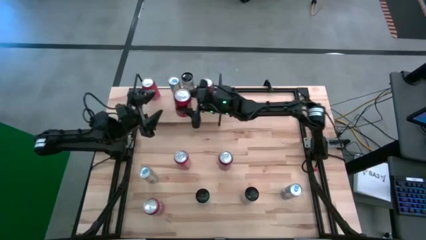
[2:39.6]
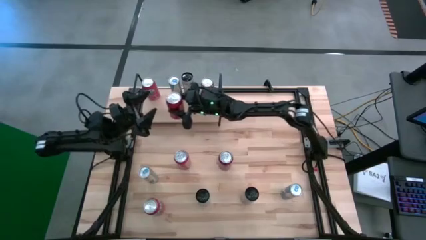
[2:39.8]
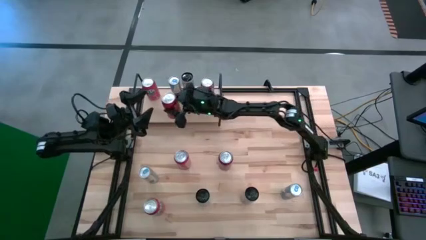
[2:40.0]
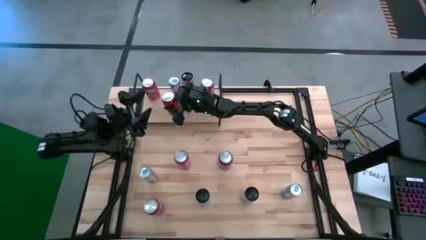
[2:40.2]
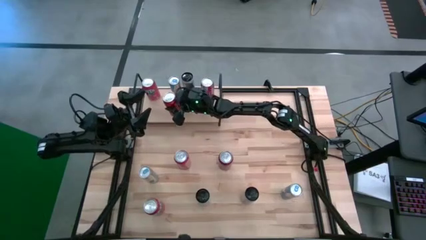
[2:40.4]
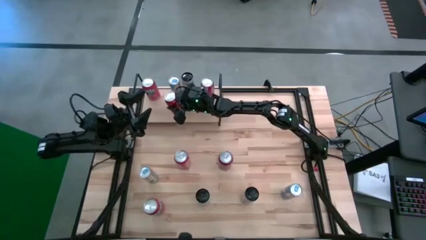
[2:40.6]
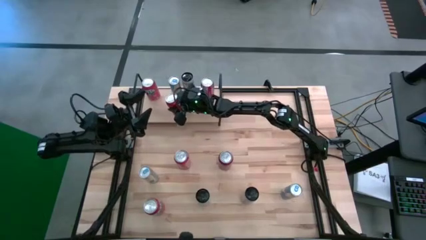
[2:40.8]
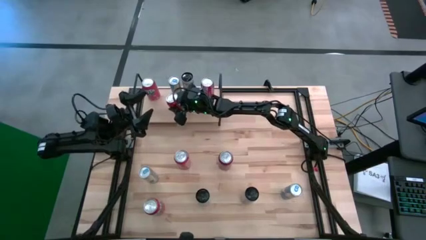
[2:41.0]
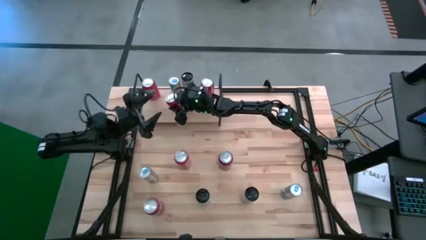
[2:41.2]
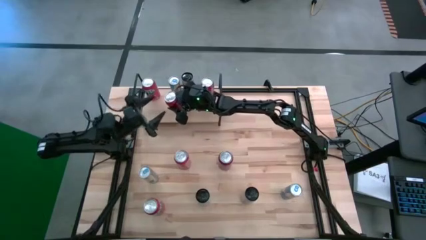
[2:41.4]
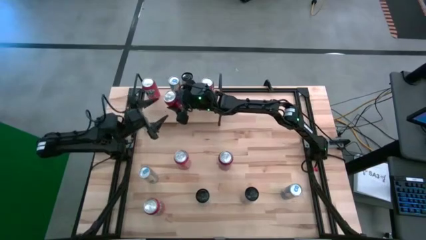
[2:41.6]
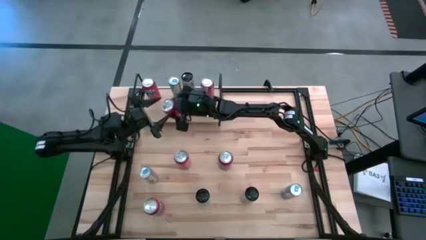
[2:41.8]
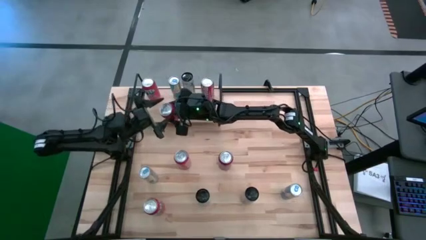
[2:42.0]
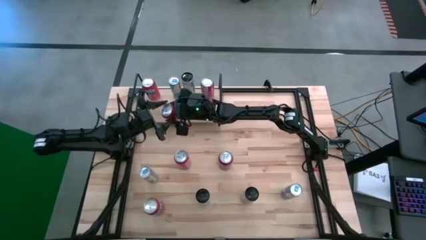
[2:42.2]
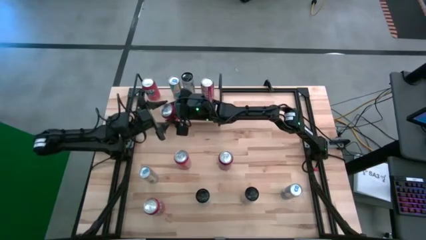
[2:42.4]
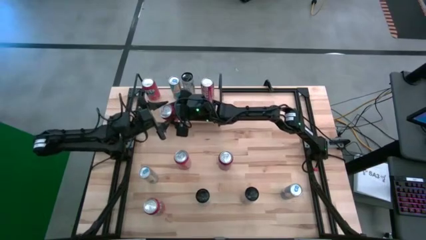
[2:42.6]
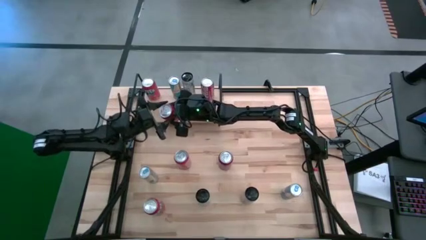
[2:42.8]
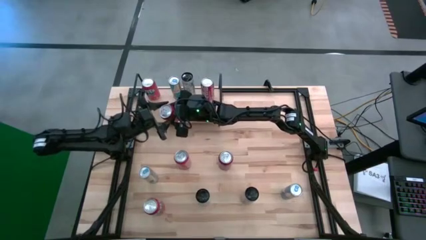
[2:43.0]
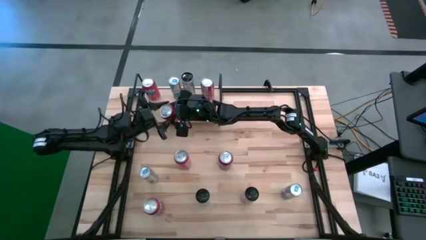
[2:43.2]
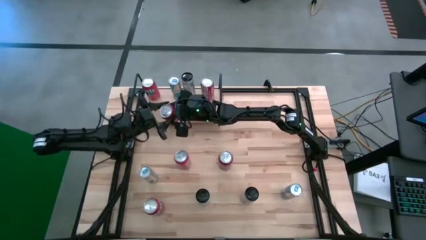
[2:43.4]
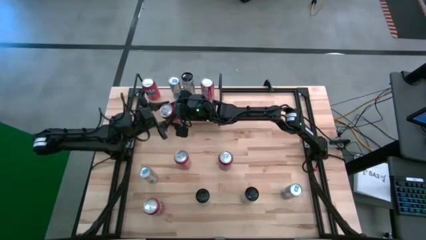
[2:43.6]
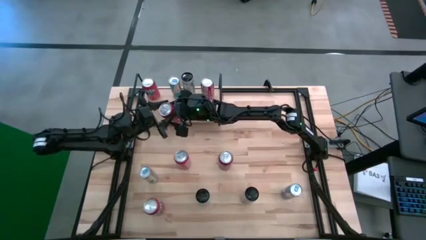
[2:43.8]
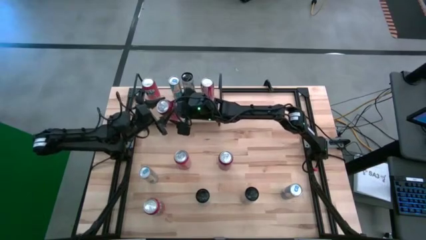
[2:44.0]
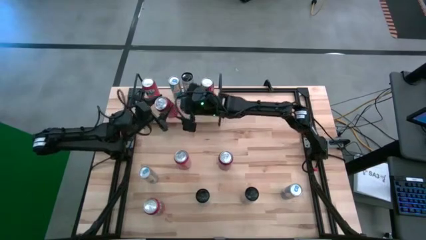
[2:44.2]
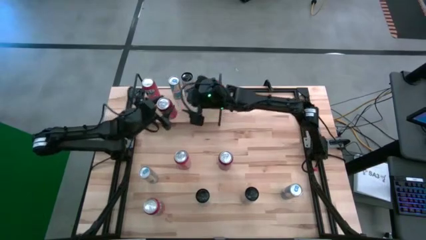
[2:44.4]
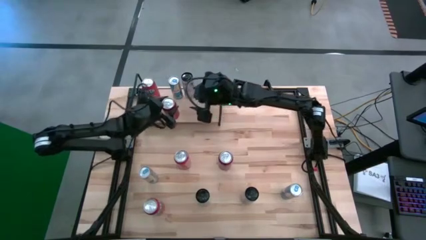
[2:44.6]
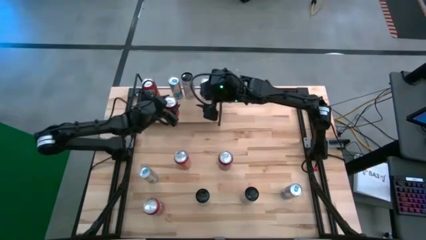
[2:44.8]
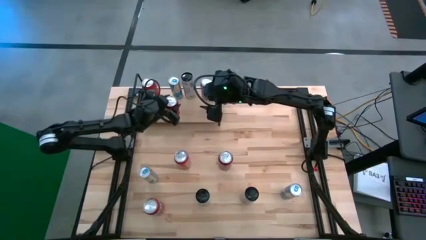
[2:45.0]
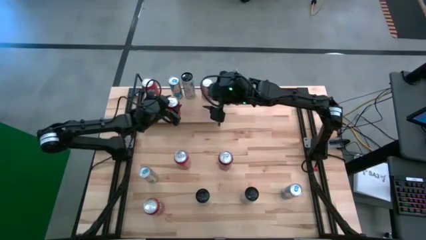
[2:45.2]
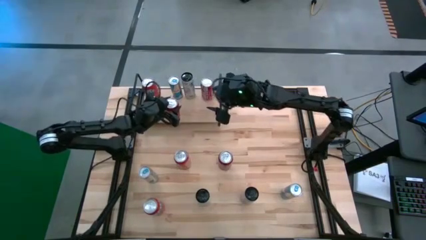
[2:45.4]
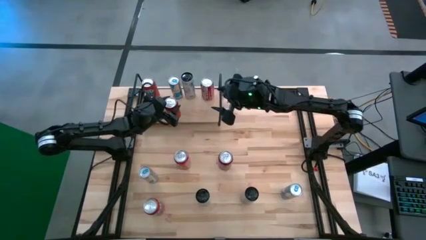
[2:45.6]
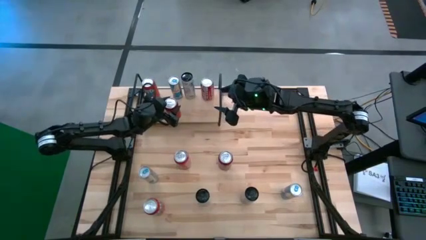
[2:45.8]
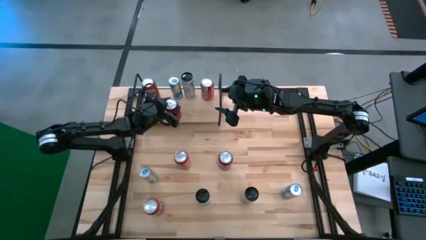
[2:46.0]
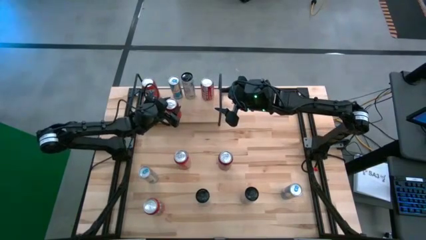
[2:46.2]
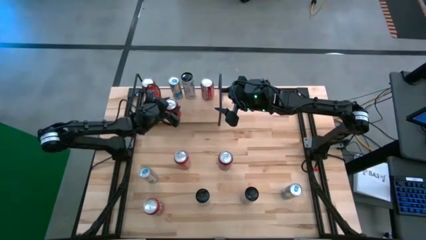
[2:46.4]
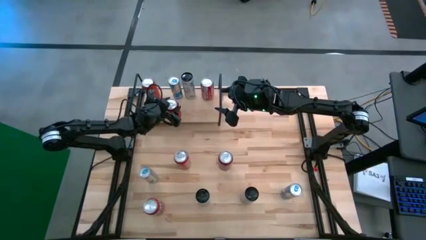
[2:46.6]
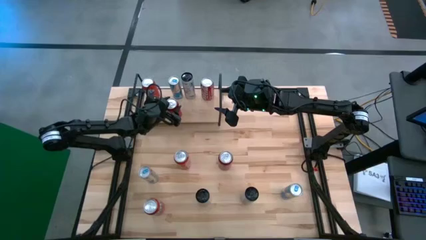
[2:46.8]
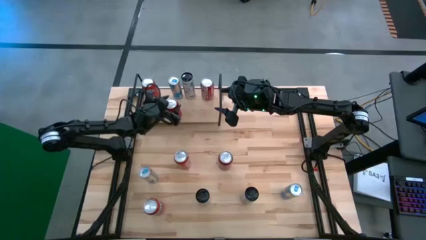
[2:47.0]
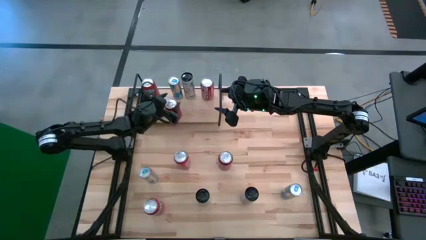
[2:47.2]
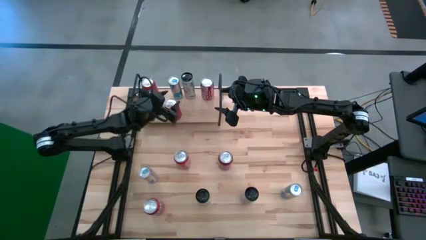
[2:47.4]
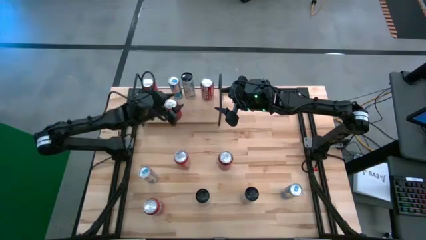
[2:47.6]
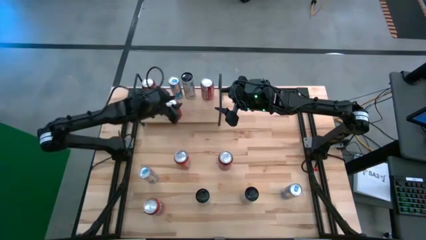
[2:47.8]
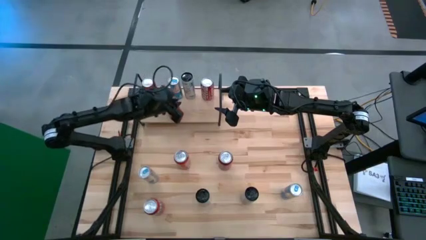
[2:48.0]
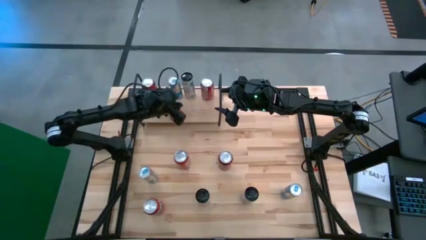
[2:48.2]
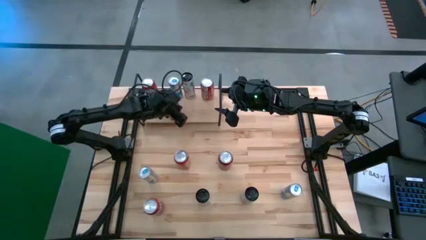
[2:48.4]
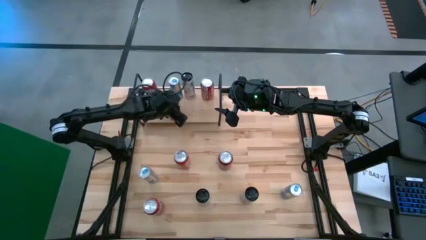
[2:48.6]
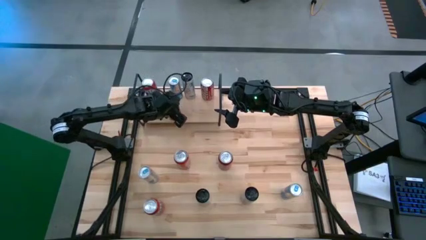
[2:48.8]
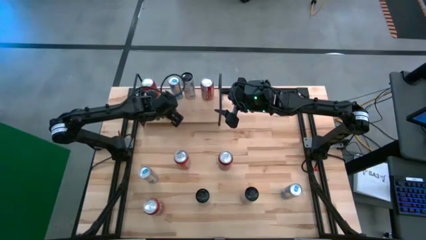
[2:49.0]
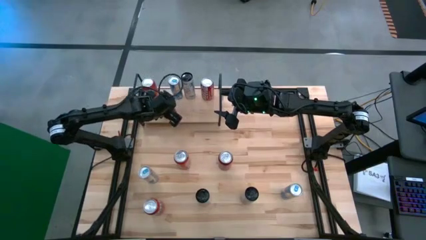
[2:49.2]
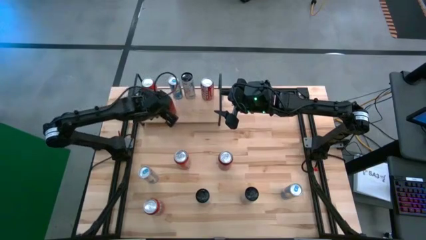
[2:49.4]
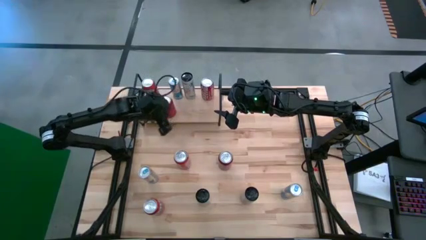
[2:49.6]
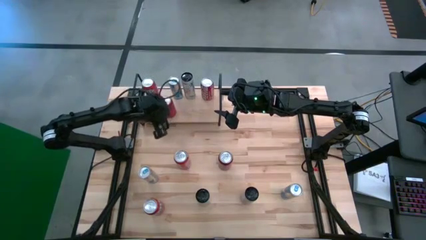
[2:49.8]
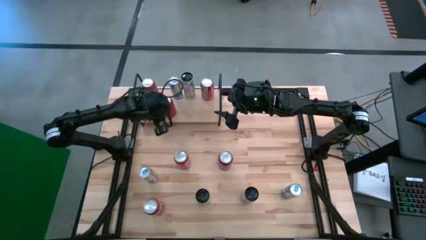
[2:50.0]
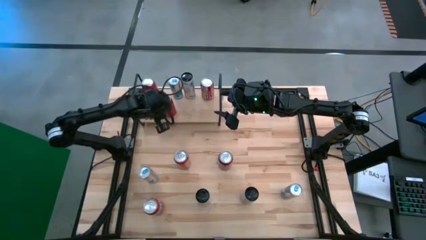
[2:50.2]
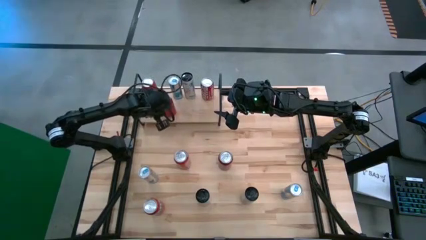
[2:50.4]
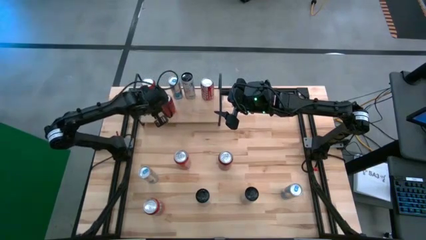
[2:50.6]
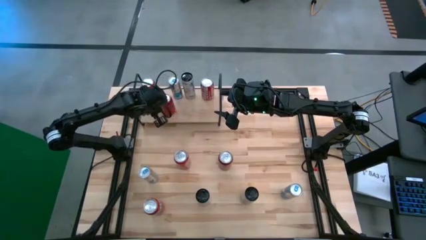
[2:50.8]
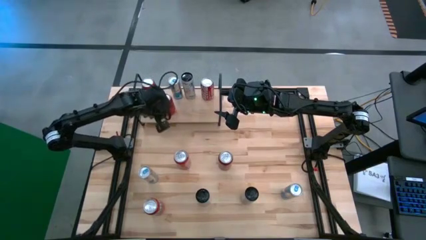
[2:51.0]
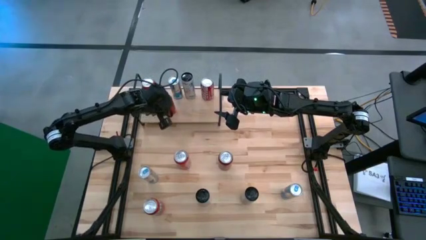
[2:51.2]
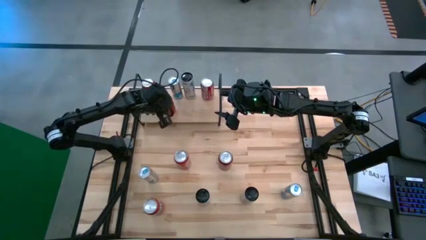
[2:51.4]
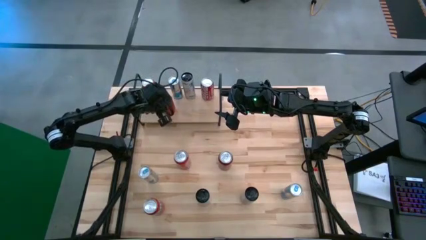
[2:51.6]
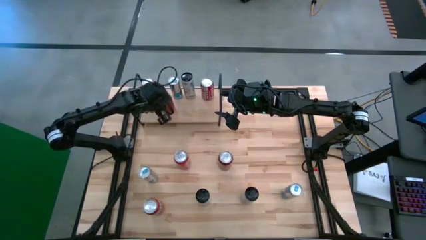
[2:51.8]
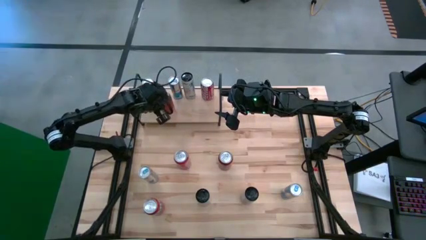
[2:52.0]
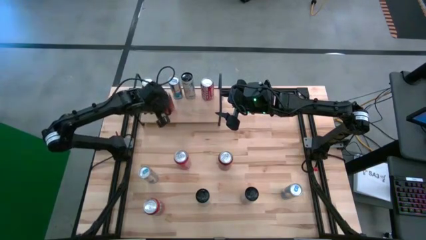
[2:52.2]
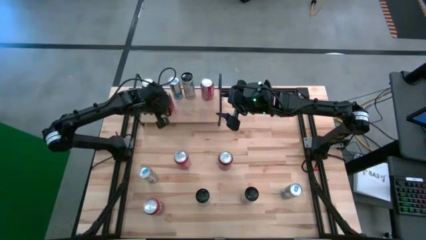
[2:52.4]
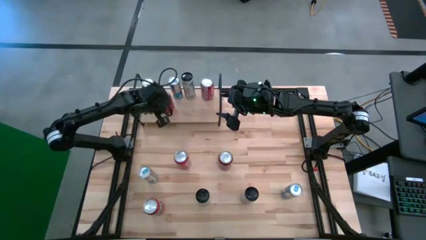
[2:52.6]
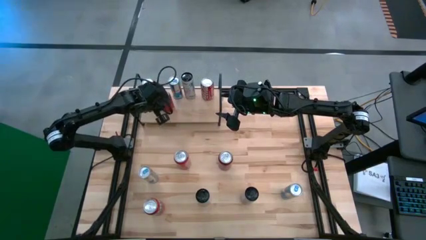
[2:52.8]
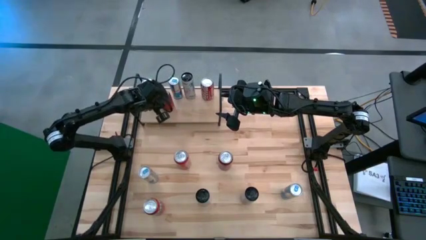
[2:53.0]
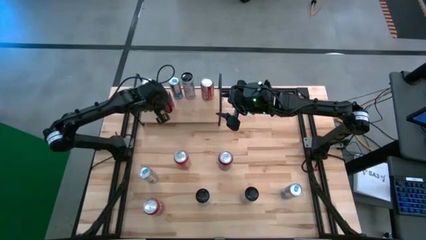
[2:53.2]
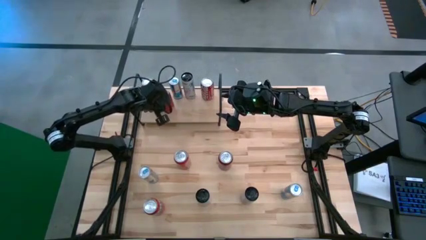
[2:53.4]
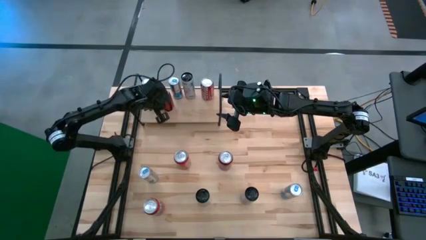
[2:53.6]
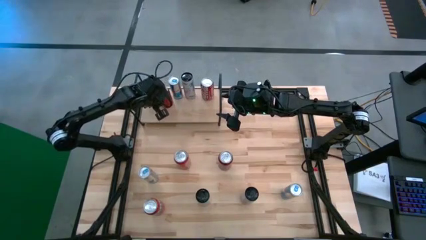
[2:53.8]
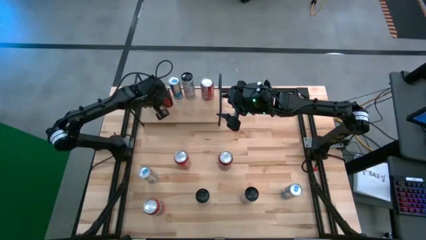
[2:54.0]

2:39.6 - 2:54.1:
Task: Place canned beverage on shelf
Put the top red black soda can on the shelf
